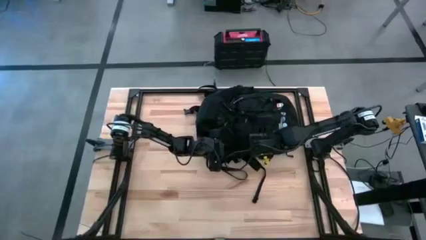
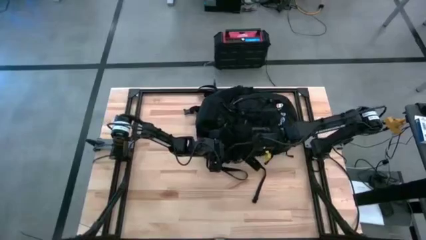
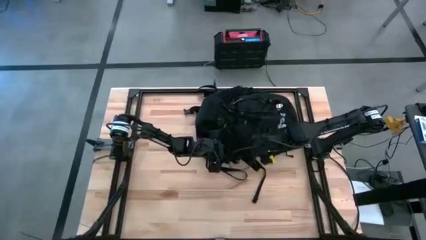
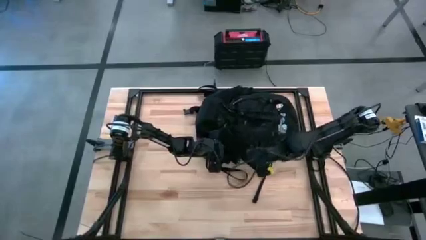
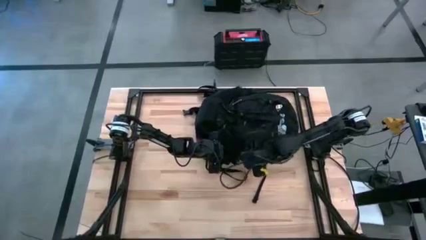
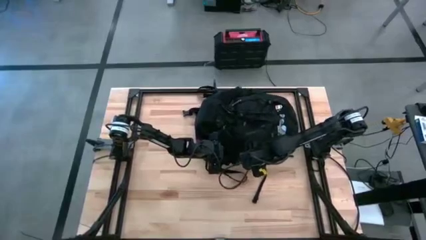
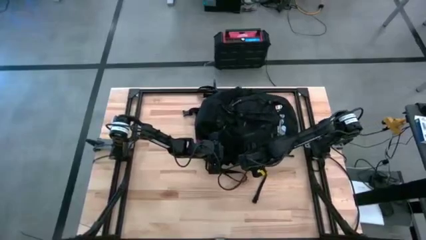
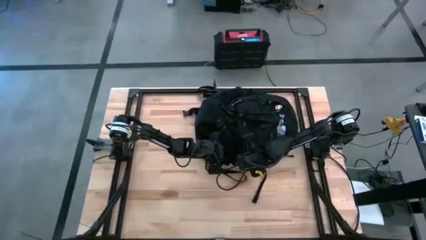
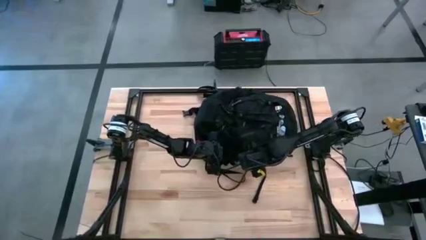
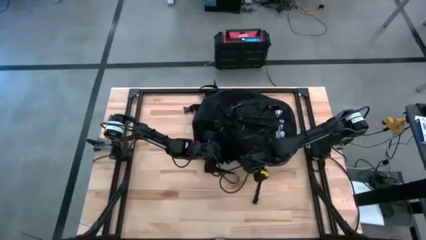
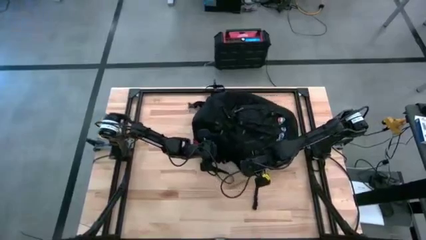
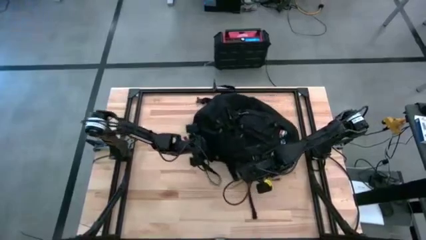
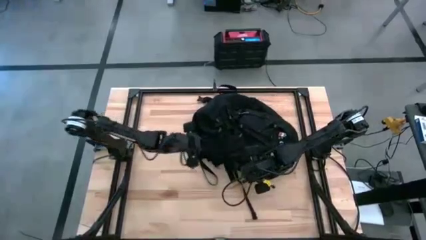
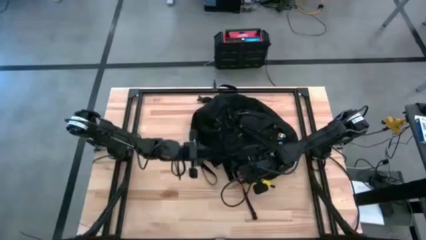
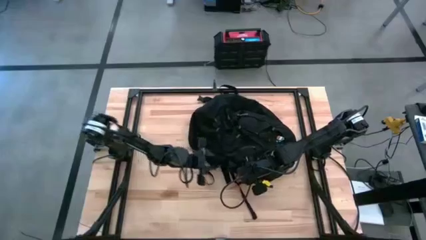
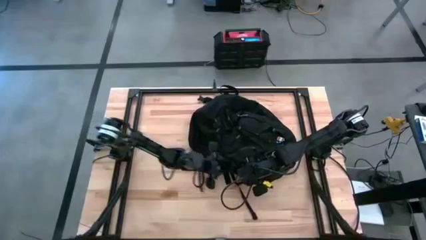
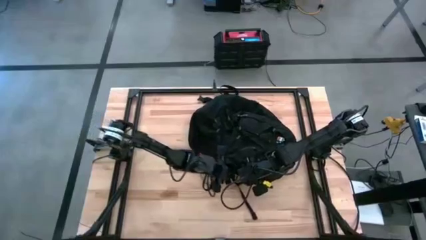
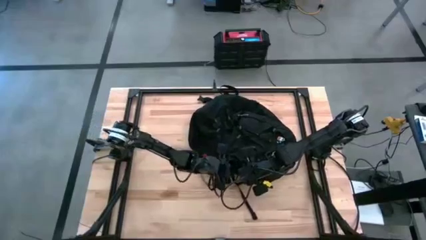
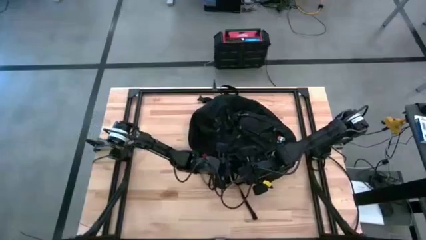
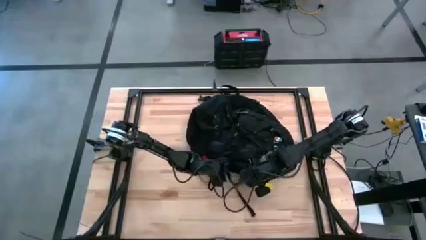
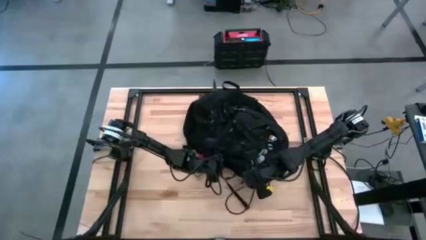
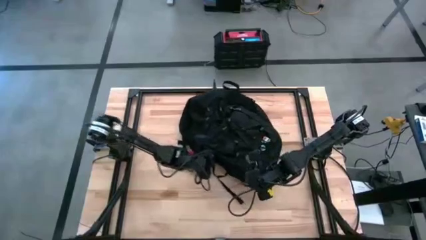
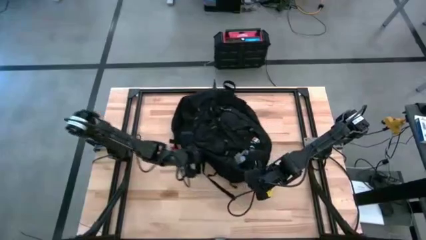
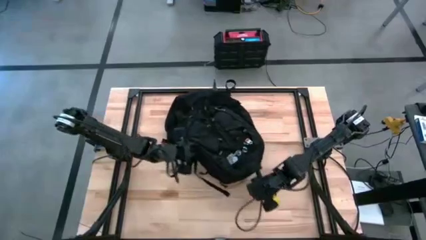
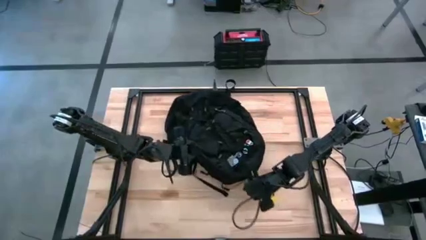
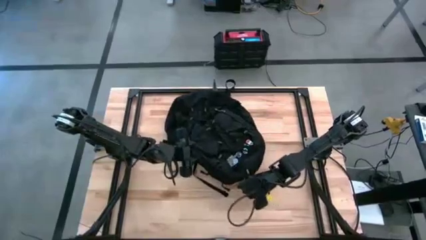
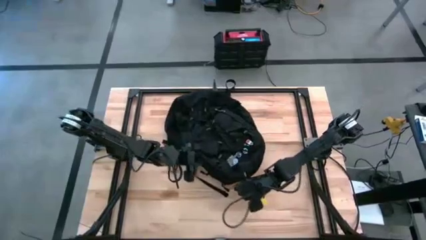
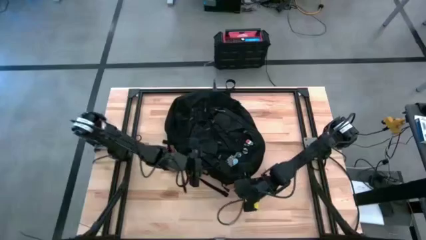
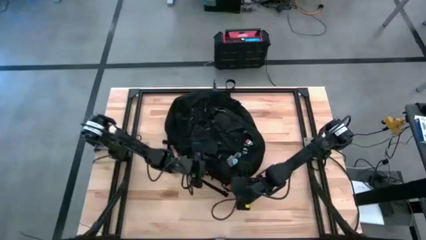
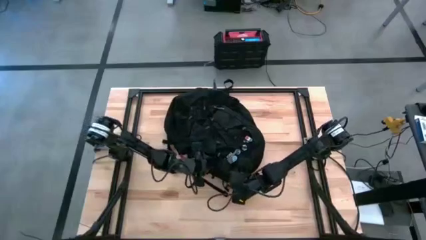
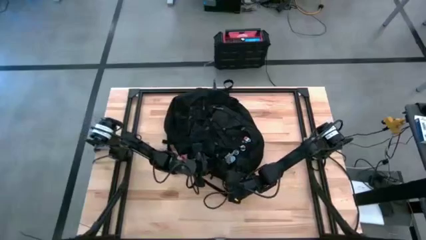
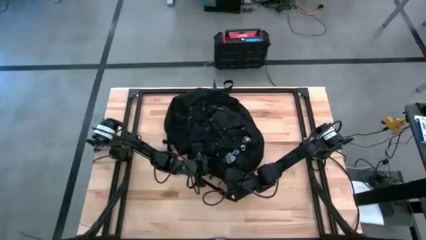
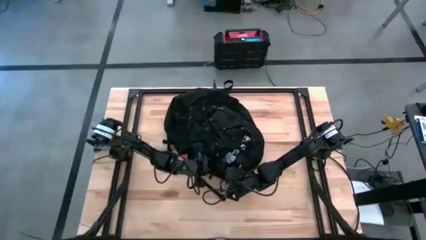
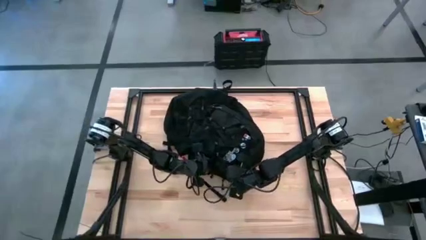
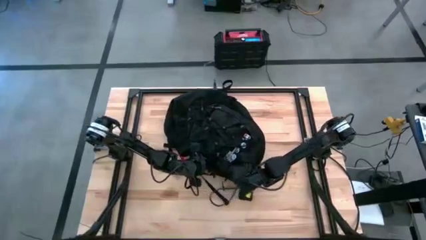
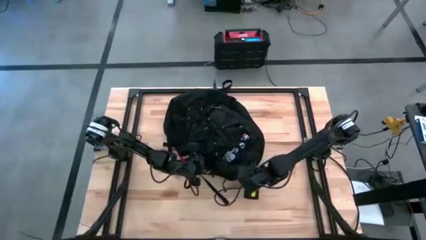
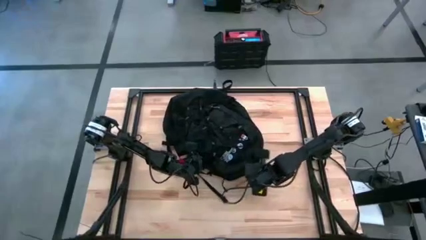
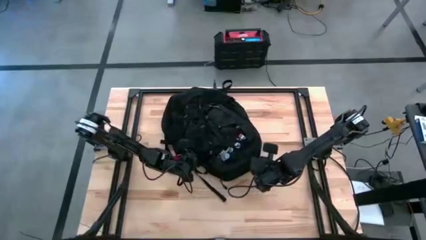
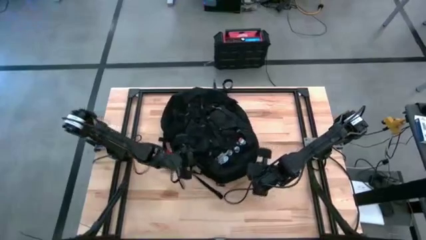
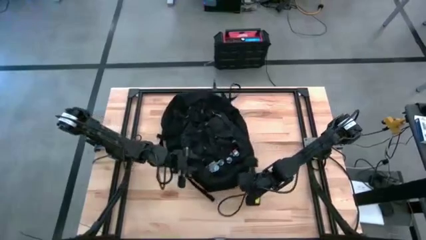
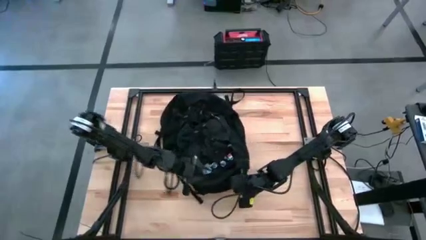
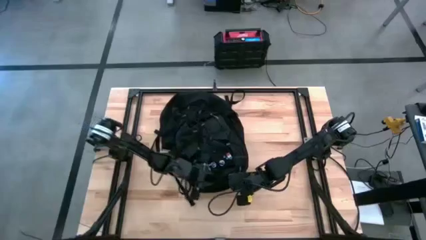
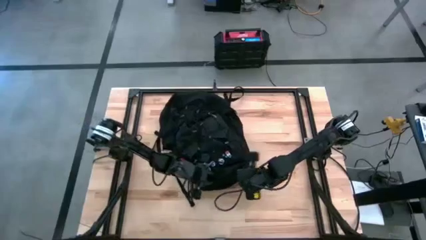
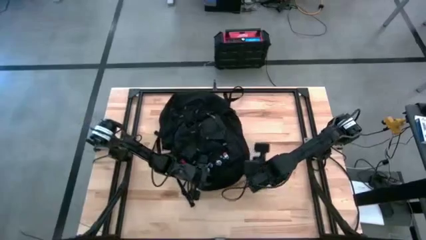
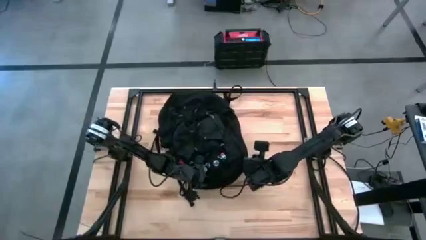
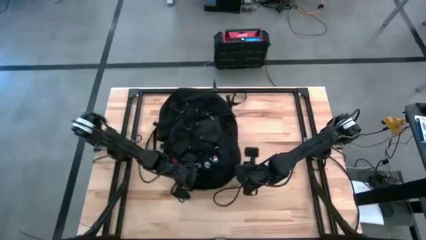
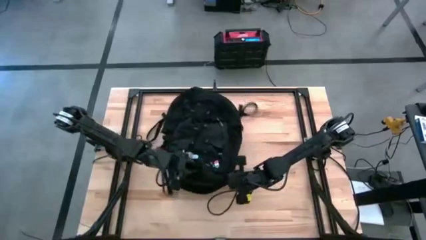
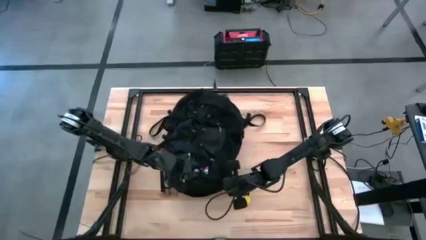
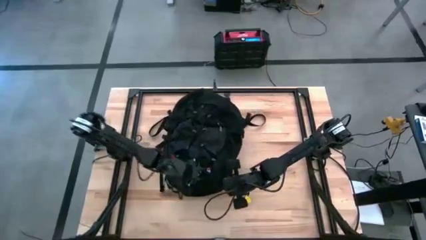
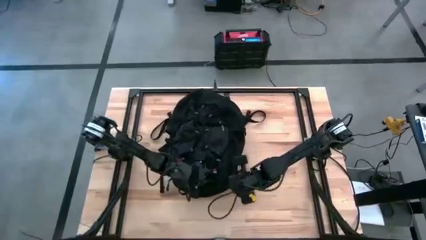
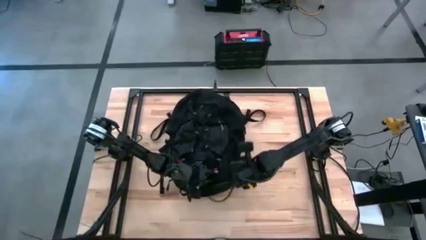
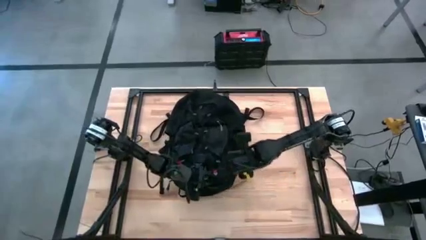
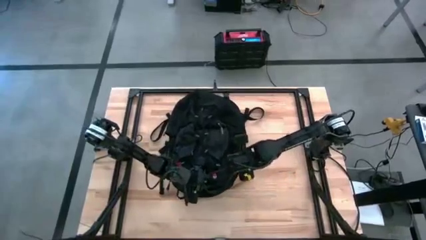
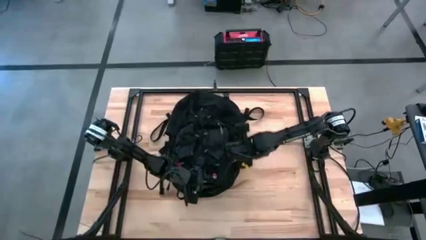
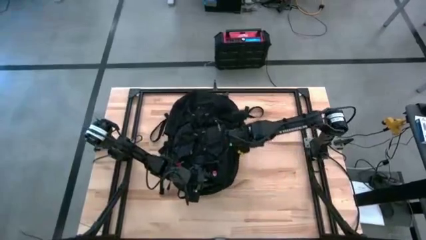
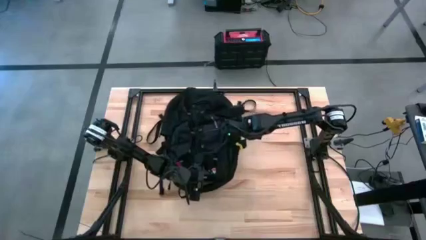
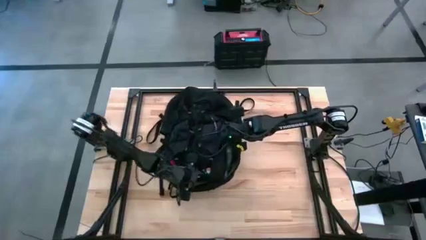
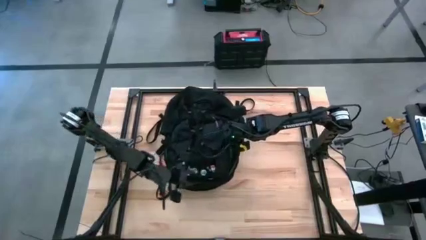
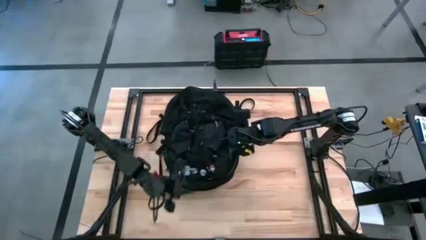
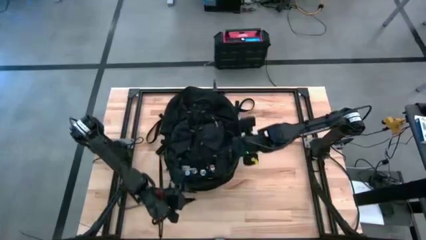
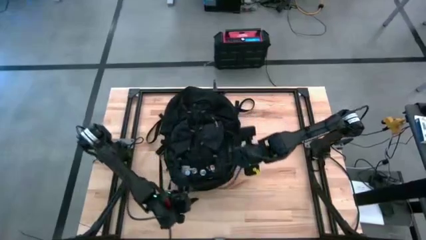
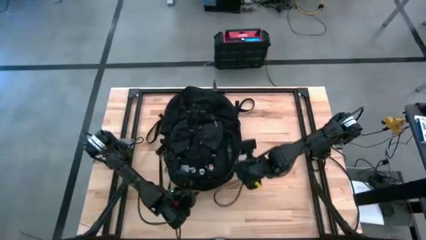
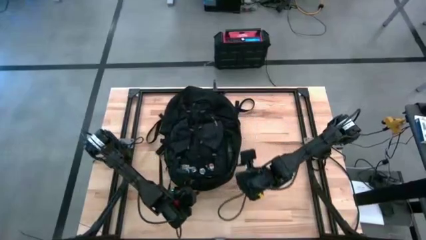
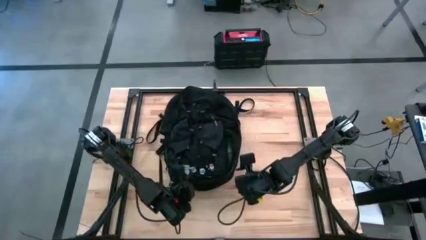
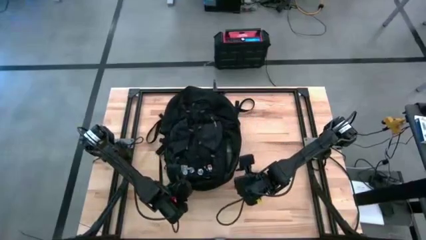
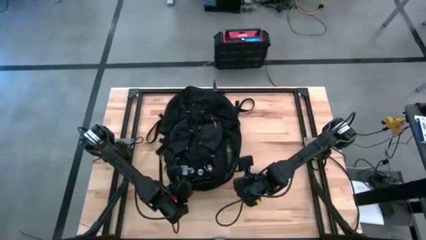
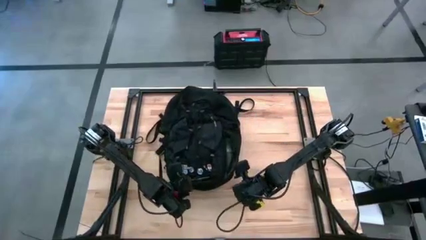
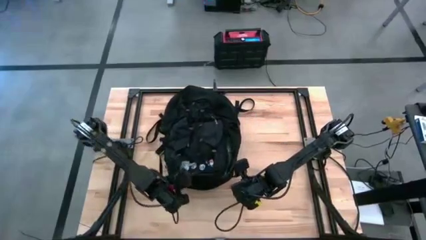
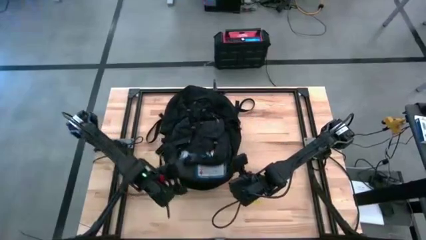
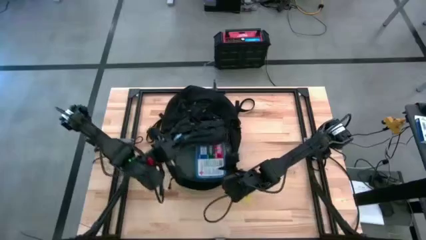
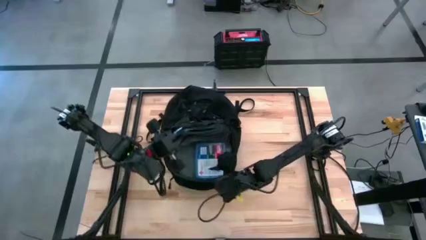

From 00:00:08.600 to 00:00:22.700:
Task: Unpack backpack
Open the black backpack

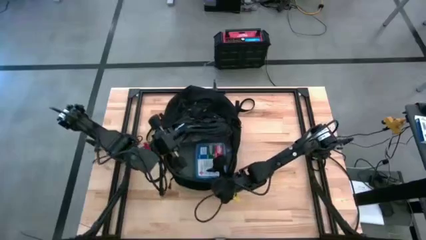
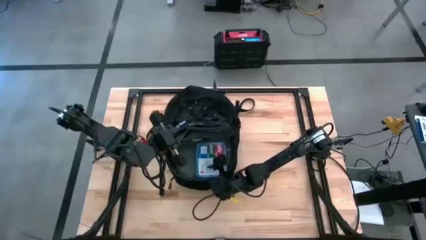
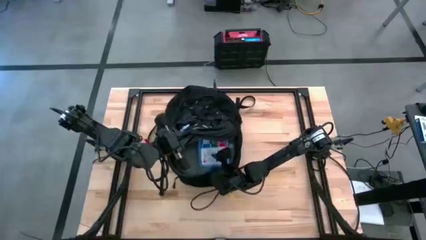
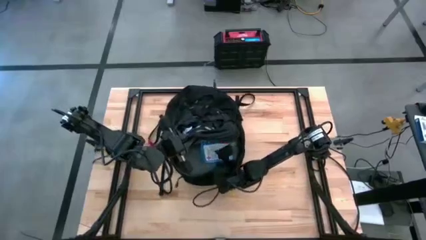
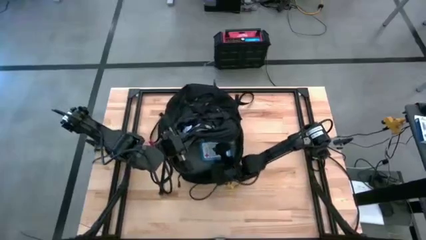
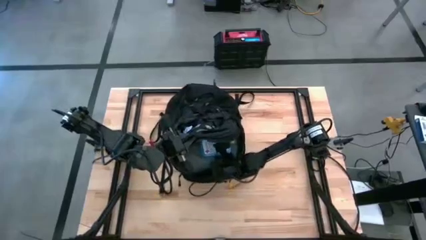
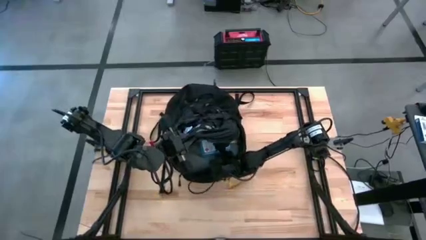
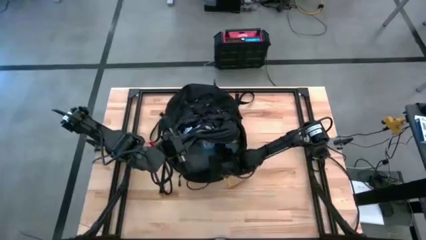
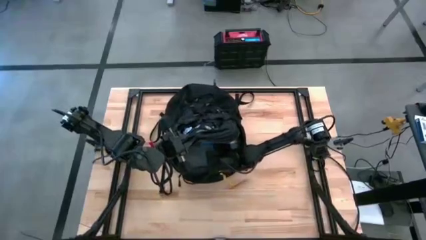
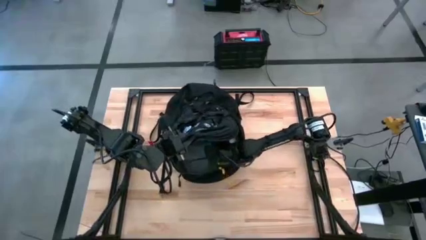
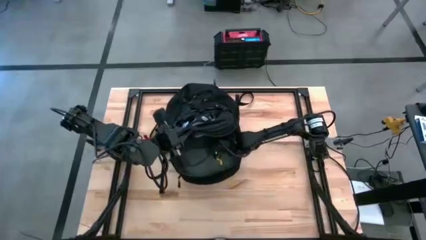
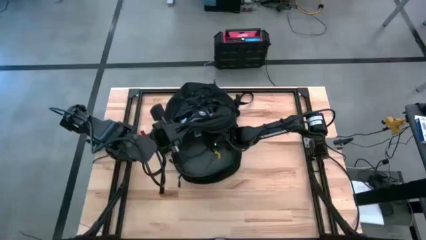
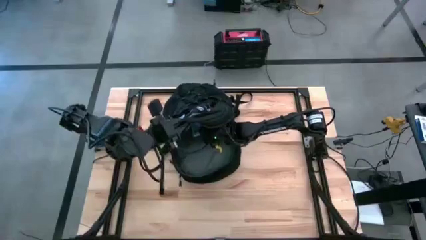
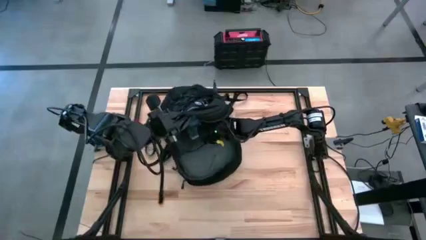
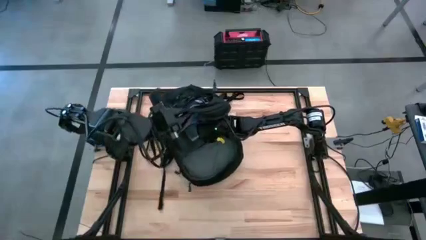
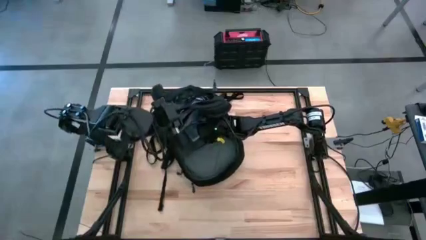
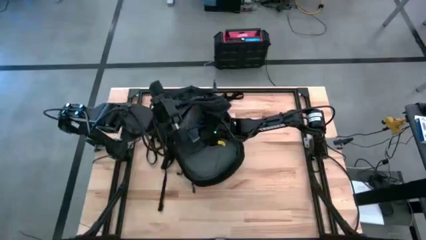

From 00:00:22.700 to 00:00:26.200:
Remove the blue first aid kit from the black backpack
